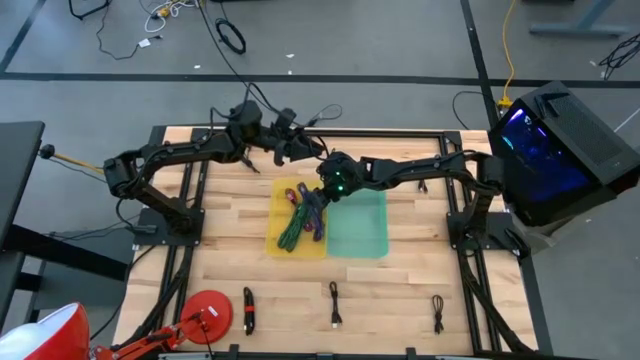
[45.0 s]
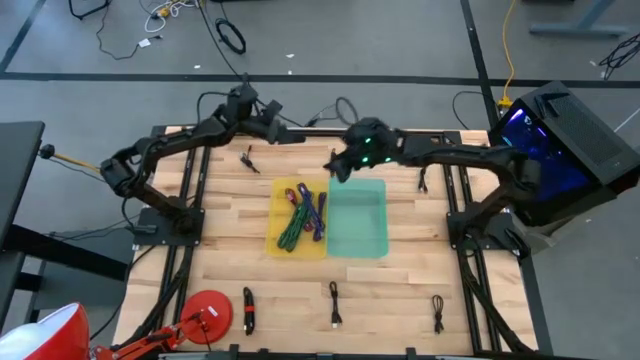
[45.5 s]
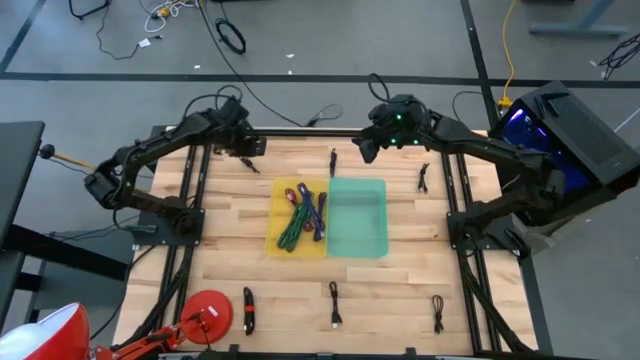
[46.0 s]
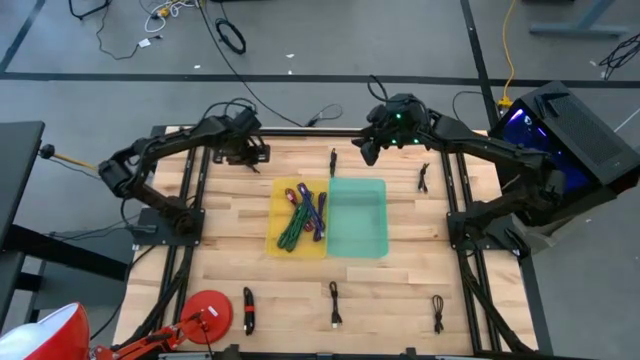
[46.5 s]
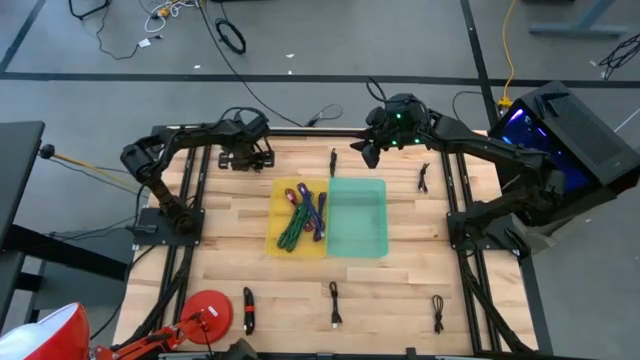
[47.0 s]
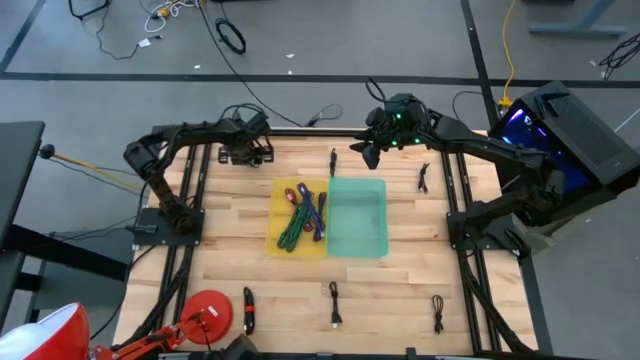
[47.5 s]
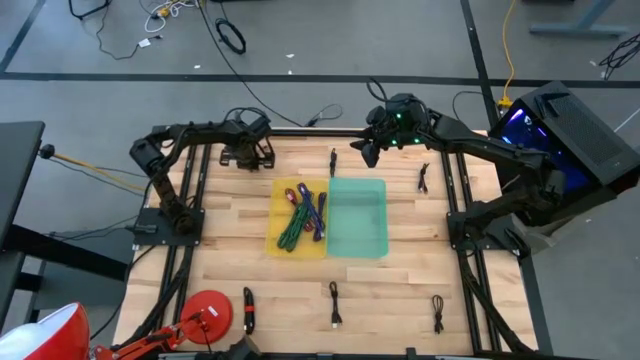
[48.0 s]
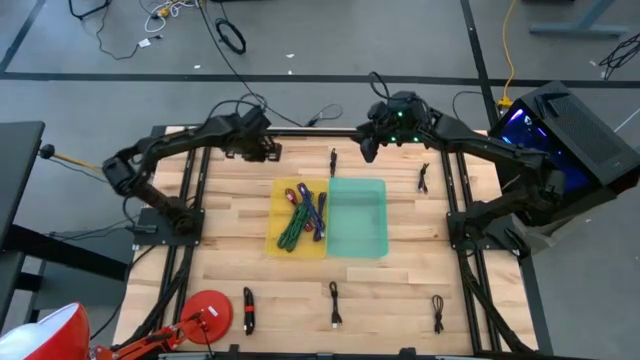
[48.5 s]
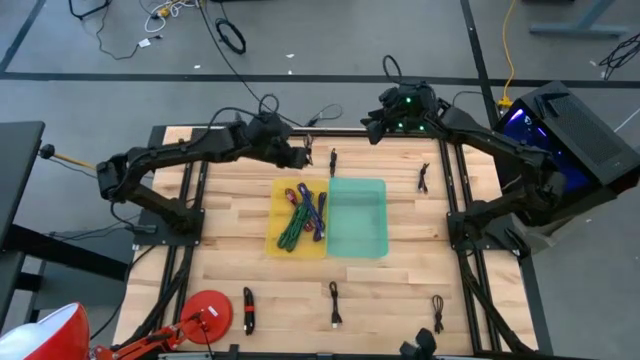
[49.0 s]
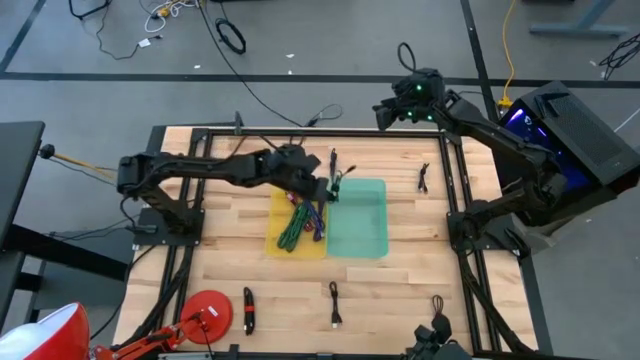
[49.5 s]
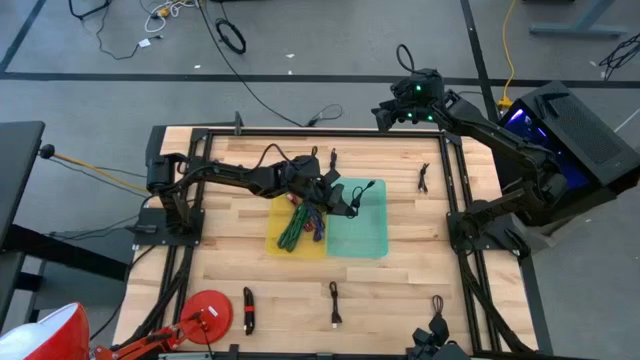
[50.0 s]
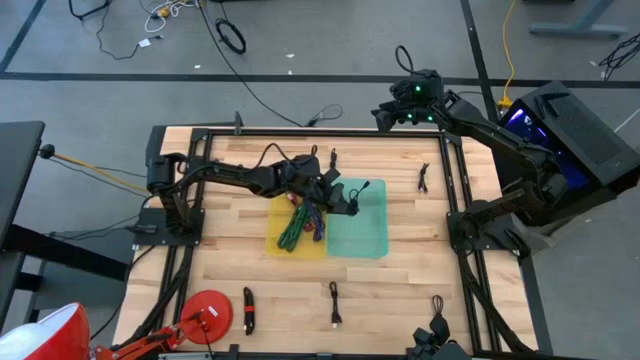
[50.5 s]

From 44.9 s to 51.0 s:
Task: Pick & Place USB Port
Put the black charger cable into the green bin

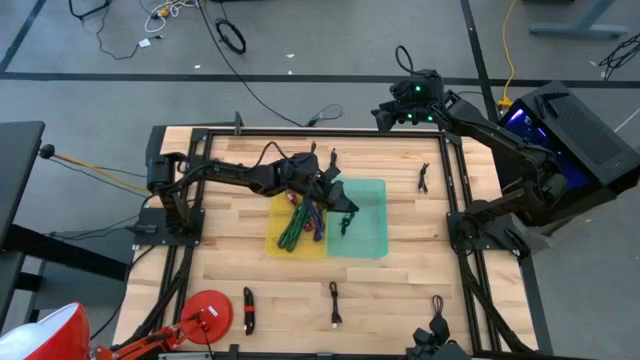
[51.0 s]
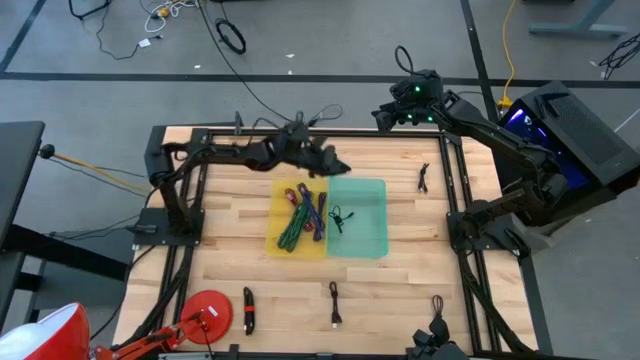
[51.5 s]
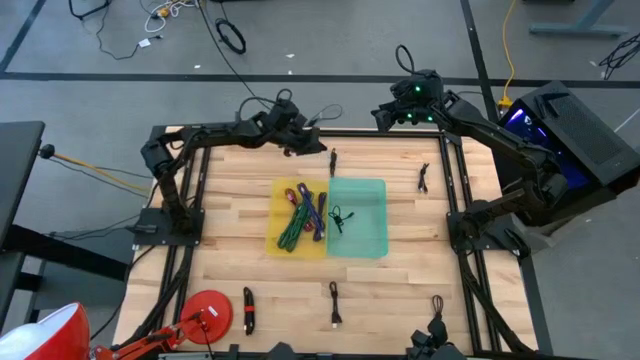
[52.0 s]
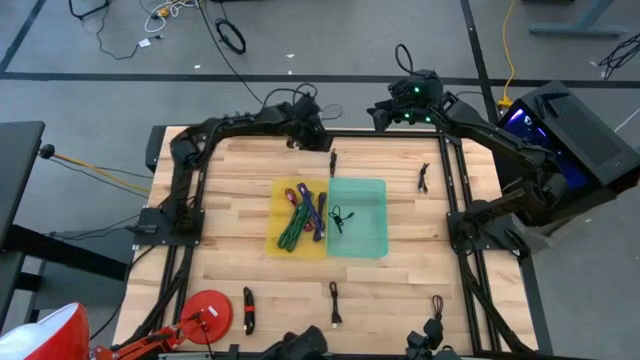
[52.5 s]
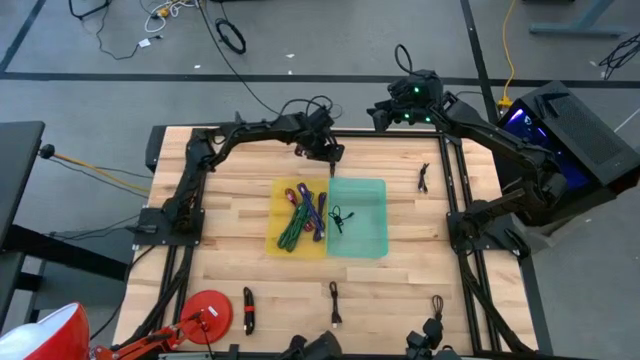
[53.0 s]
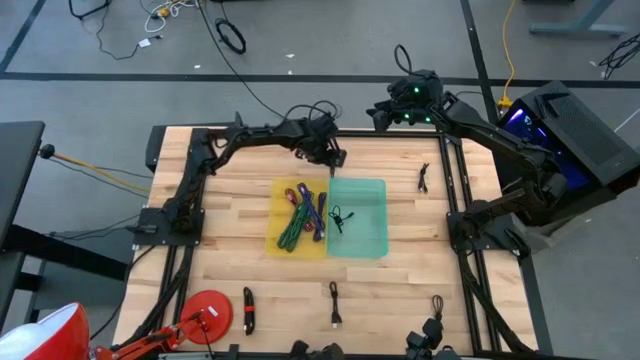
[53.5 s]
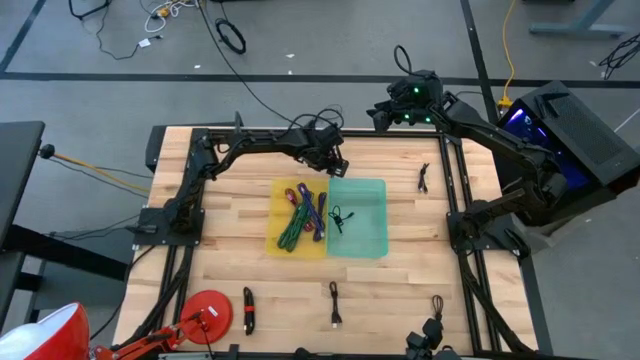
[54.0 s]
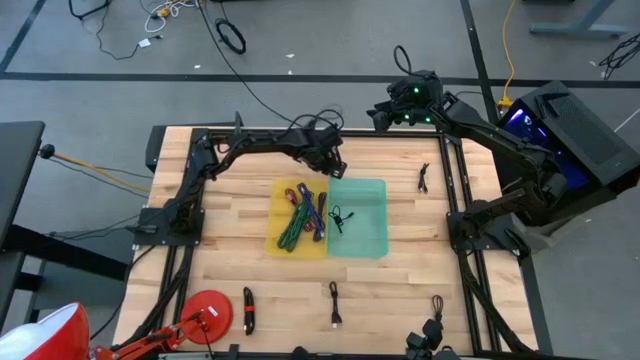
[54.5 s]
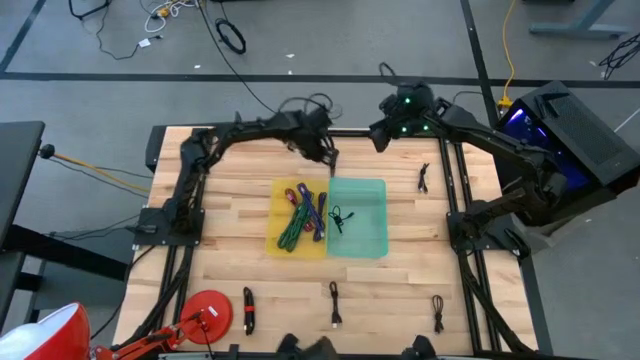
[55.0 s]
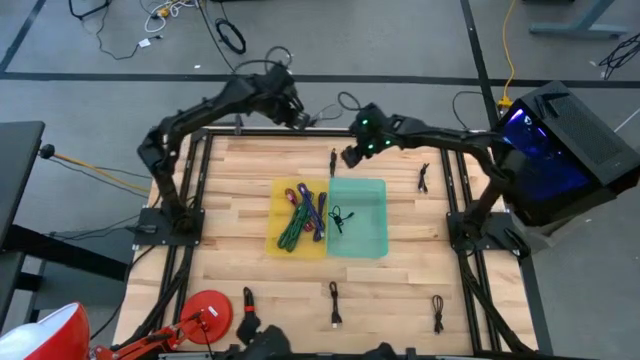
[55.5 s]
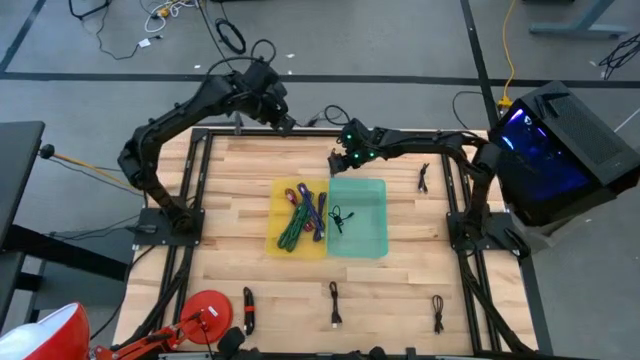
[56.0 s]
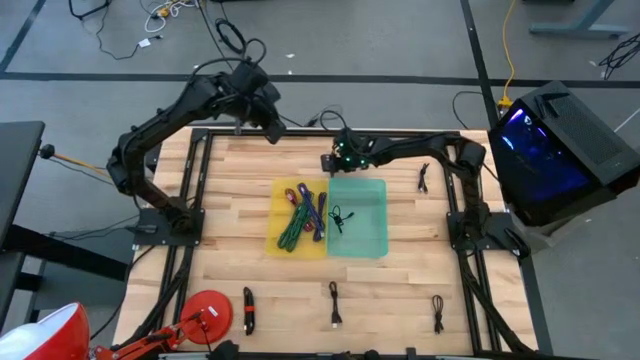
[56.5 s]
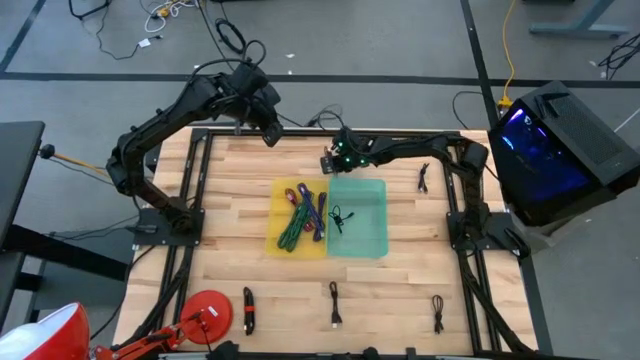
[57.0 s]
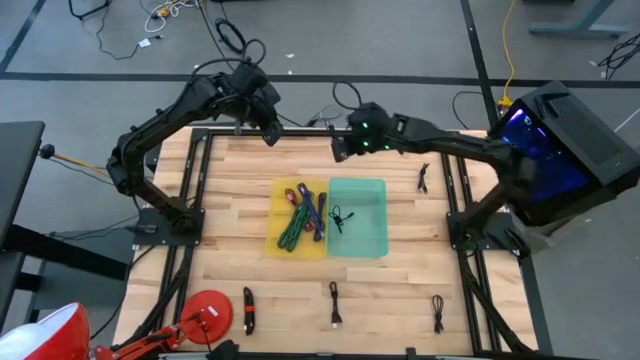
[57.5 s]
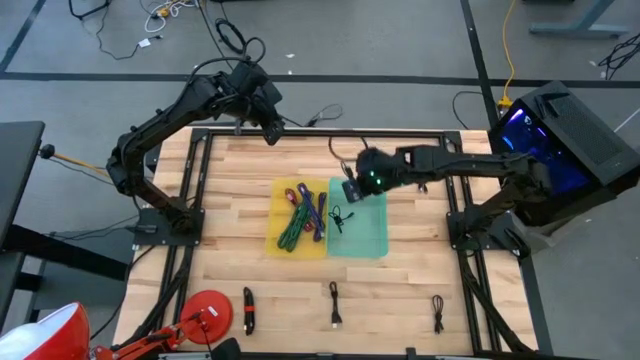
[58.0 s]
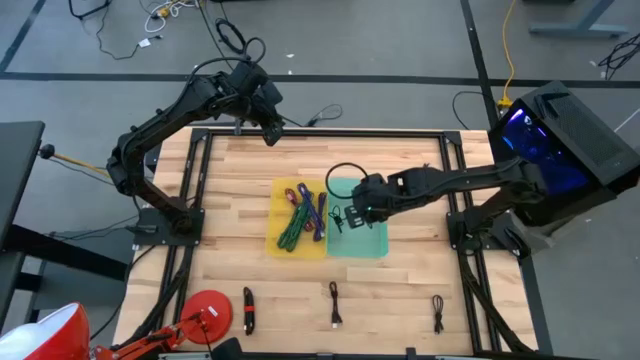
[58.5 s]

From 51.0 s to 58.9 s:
Put the black charger cable into the green bin

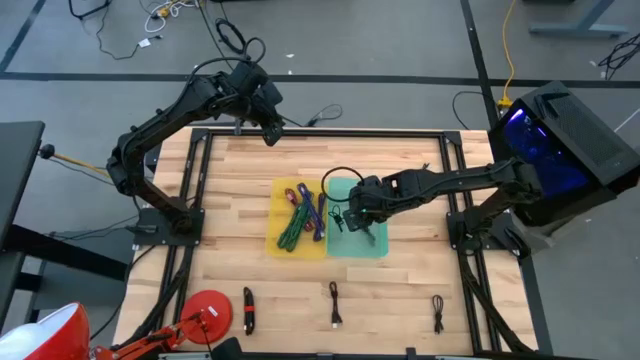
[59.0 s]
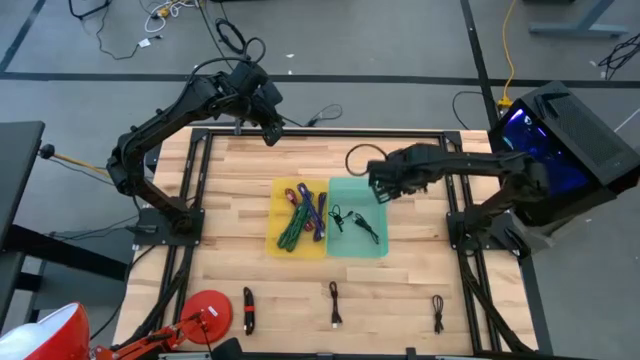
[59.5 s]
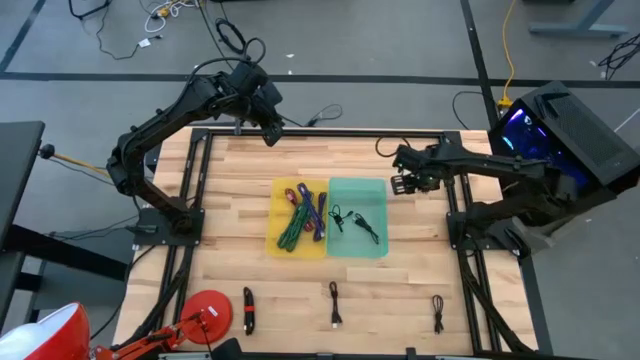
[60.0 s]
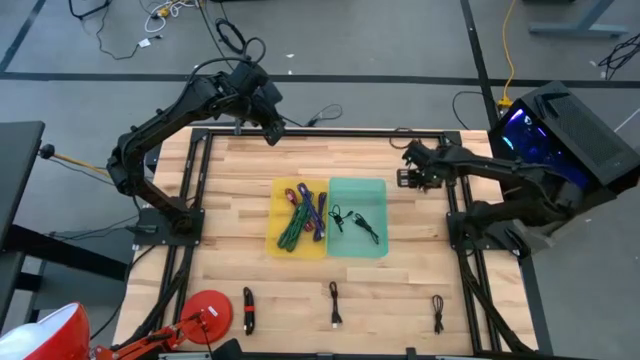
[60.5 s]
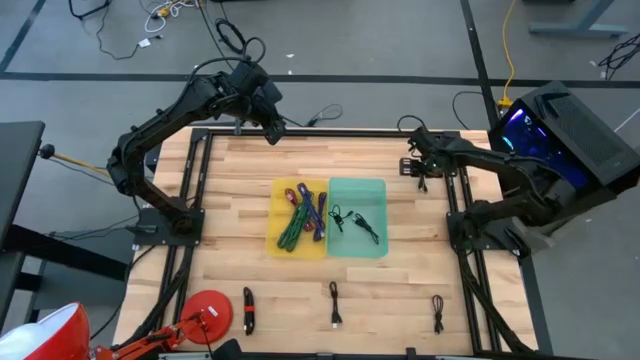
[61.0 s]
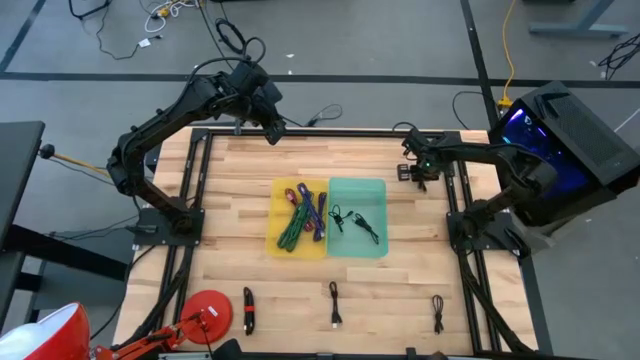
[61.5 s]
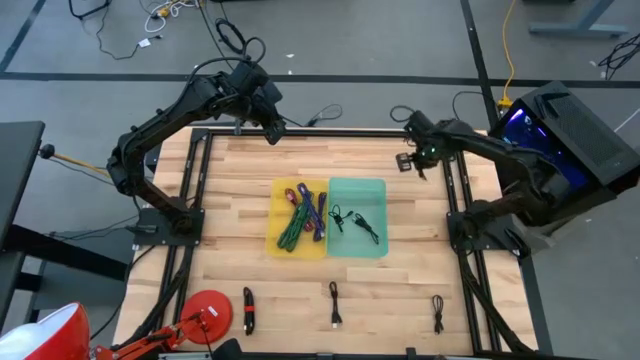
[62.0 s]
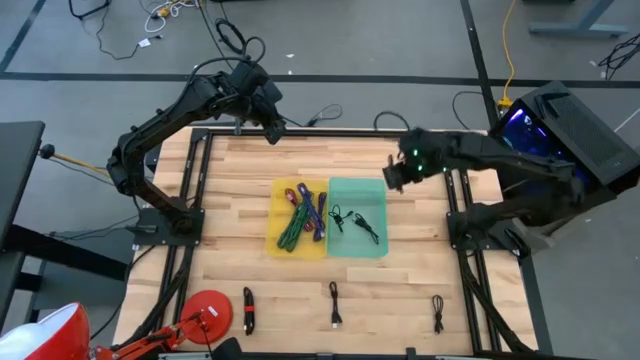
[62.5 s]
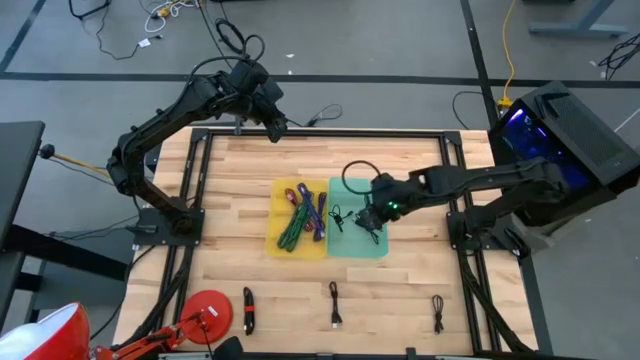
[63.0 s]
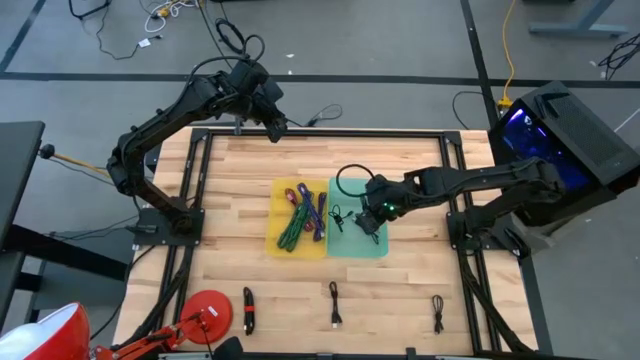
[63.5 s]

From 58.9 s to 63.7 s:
Put the black charger cable into the green bin

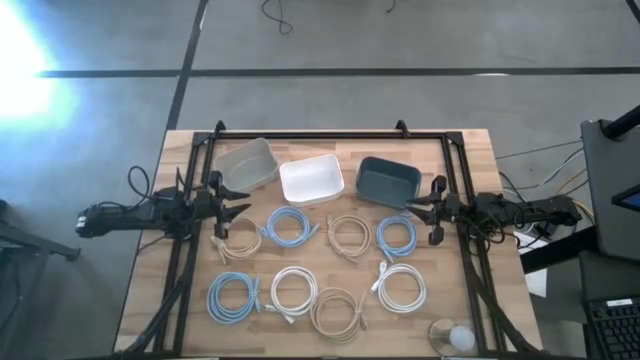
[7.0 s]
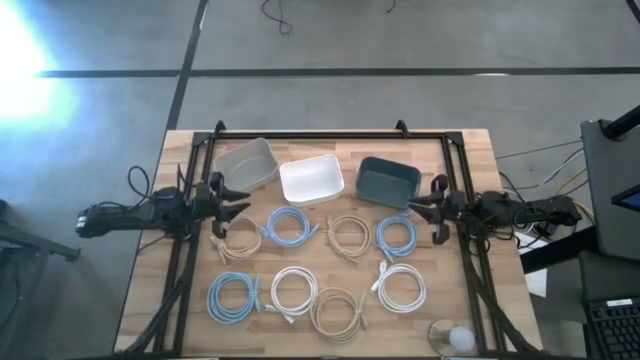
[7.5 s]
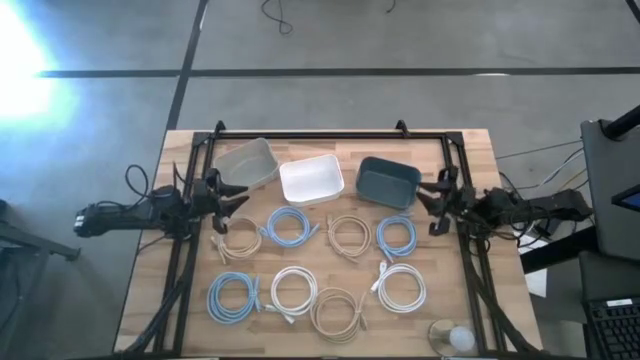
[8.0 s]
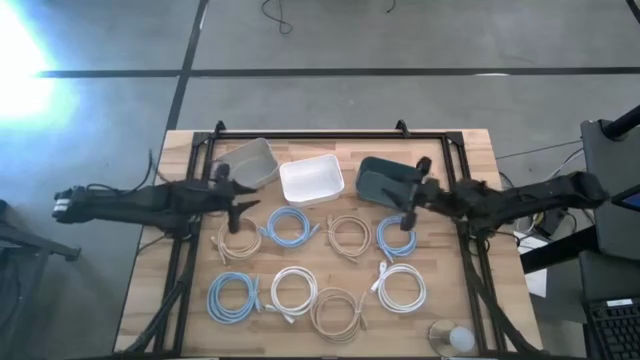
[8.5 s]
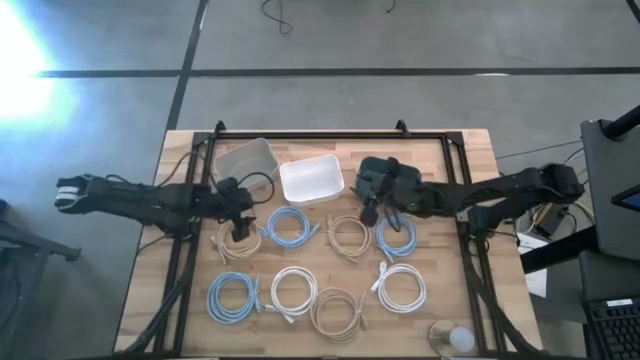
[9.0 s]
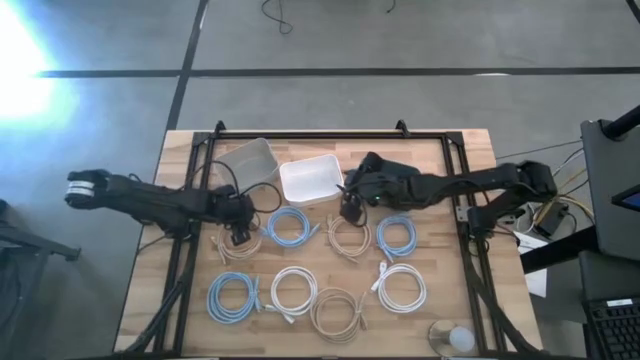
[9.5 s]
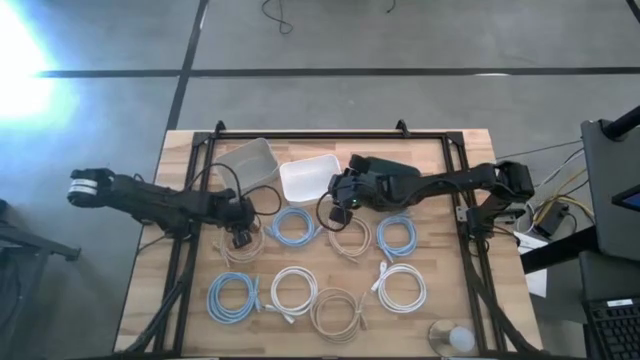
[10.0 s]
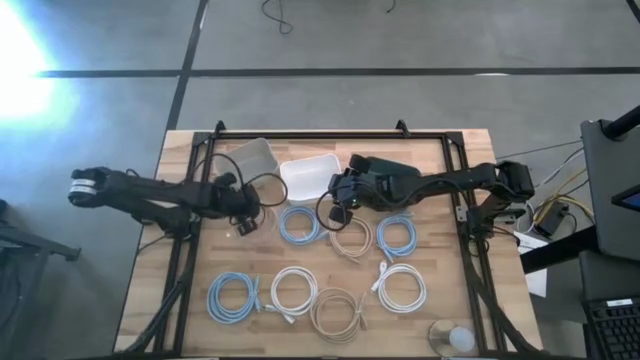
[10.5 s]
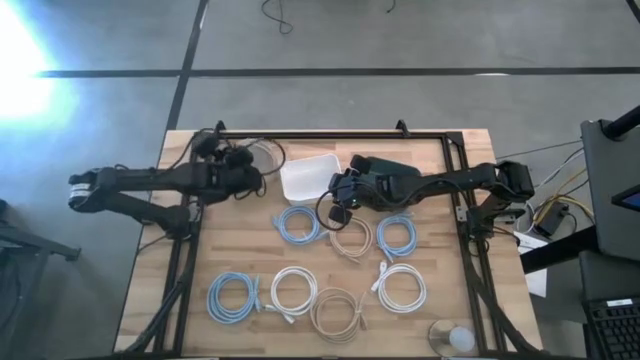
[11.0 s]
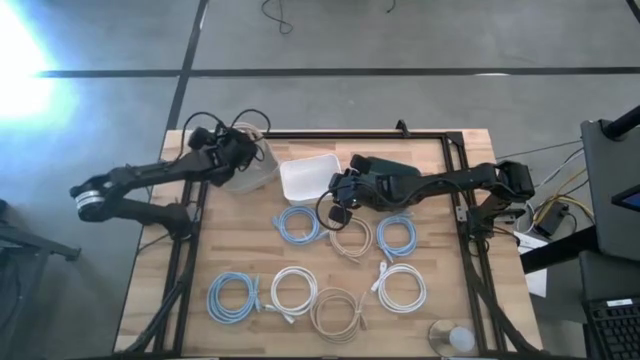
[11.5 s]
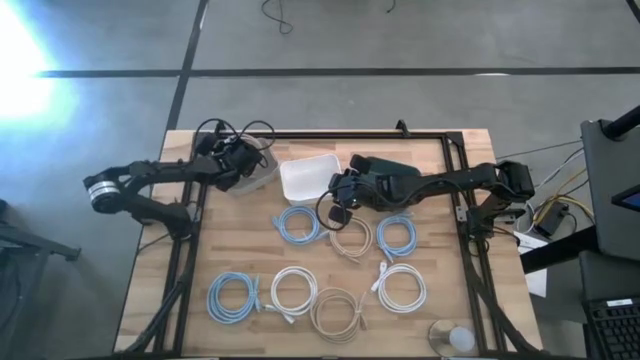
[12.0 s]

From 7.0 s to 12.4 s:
Task: Sort HDMI cables
Put the top left light brown HDMI cable into the gray bin
